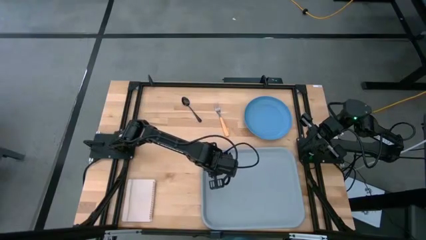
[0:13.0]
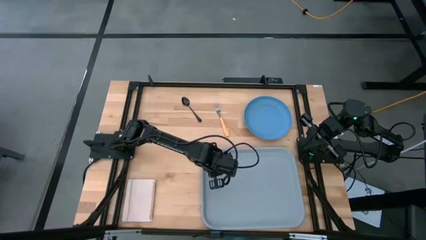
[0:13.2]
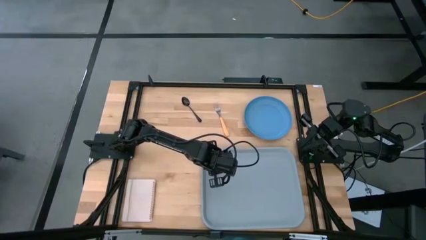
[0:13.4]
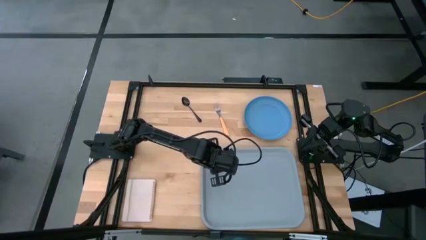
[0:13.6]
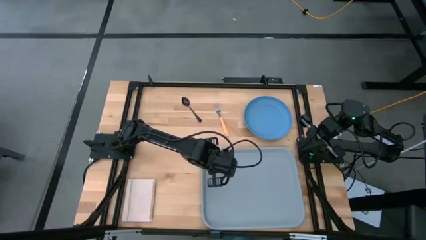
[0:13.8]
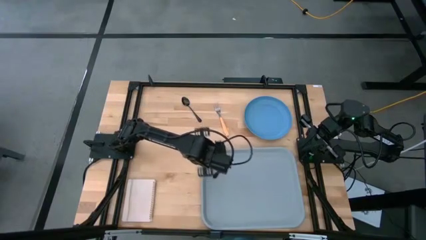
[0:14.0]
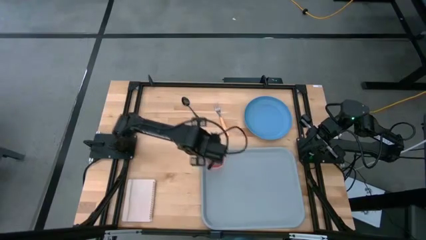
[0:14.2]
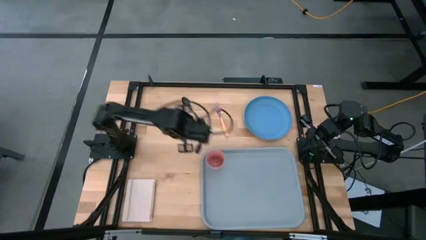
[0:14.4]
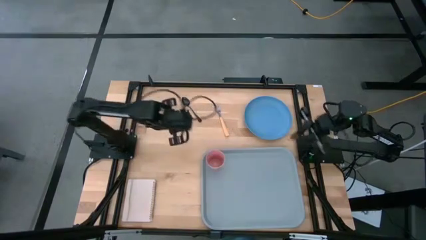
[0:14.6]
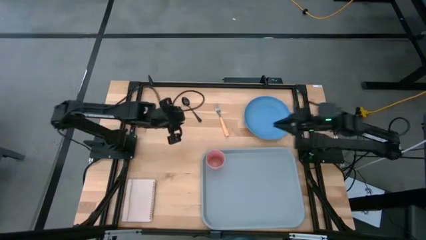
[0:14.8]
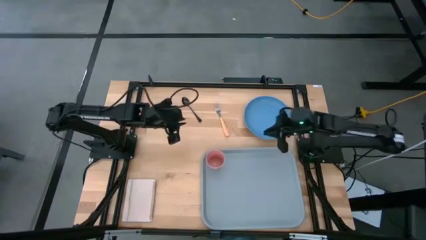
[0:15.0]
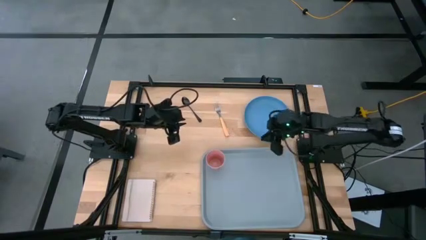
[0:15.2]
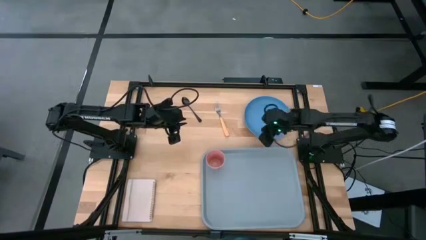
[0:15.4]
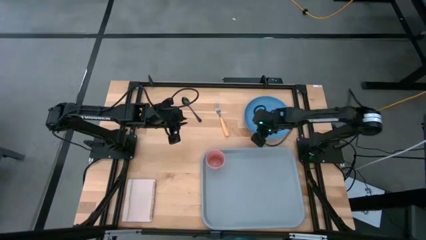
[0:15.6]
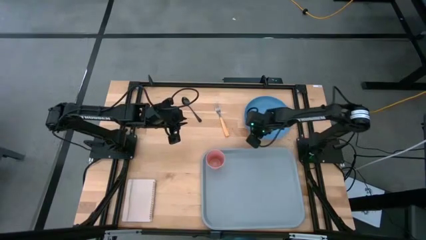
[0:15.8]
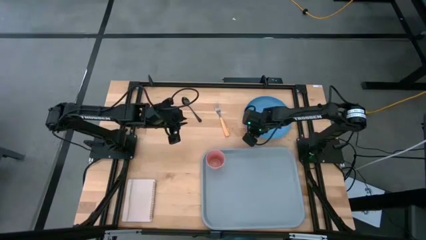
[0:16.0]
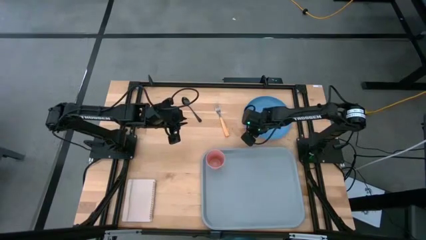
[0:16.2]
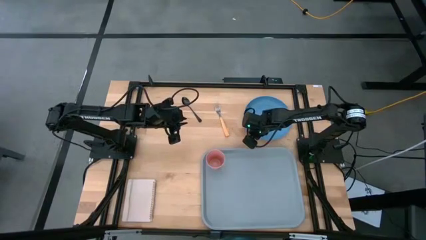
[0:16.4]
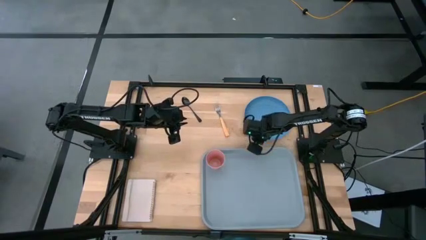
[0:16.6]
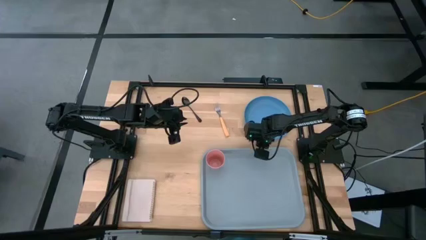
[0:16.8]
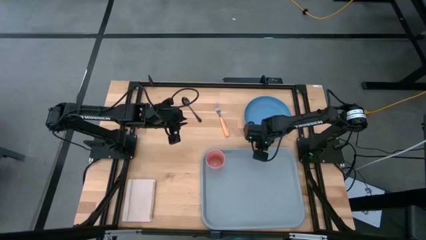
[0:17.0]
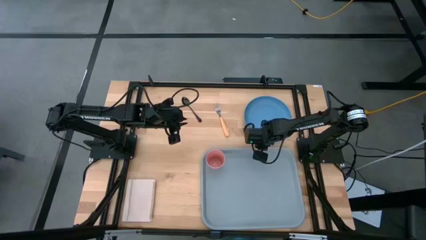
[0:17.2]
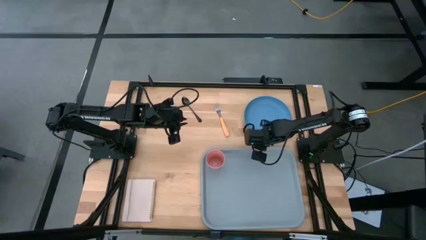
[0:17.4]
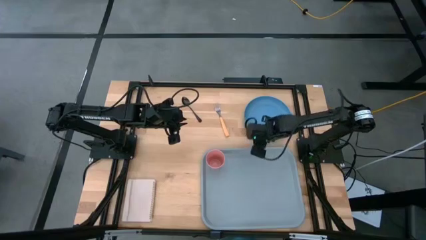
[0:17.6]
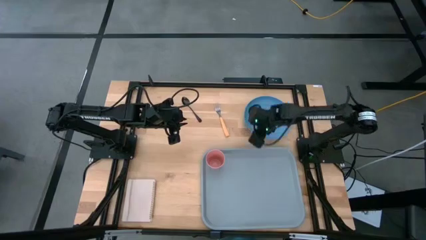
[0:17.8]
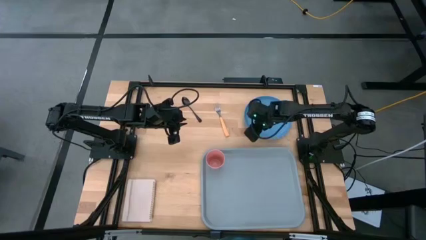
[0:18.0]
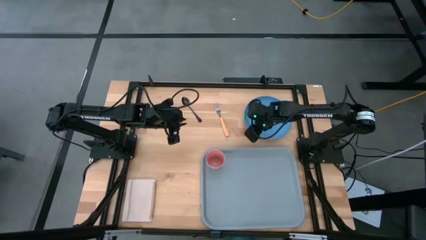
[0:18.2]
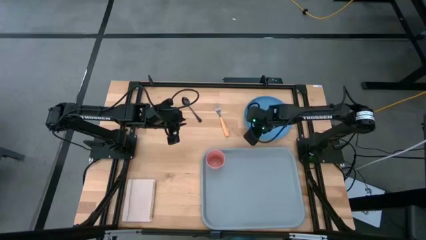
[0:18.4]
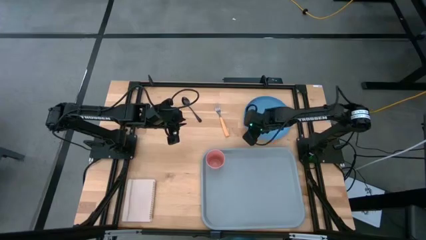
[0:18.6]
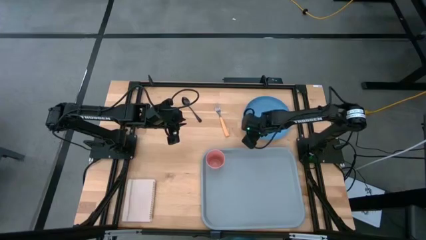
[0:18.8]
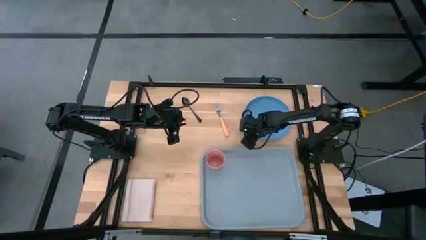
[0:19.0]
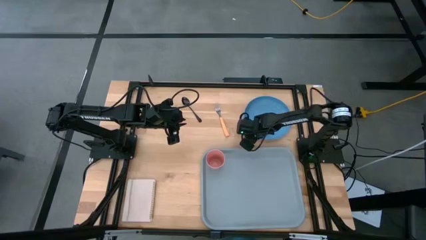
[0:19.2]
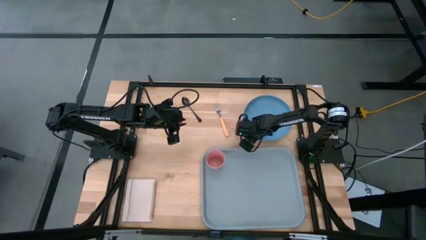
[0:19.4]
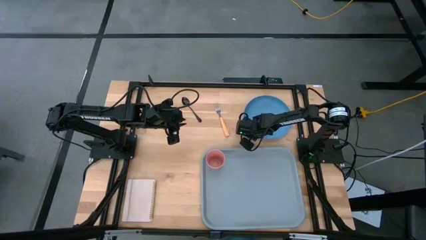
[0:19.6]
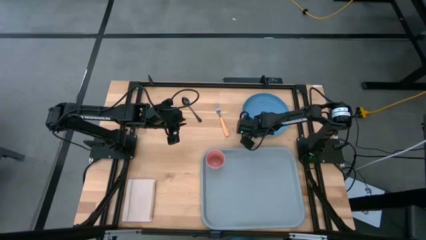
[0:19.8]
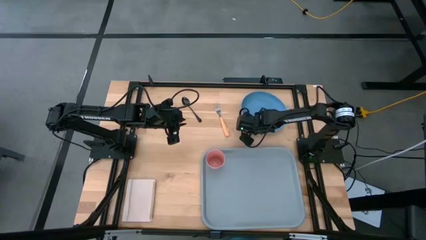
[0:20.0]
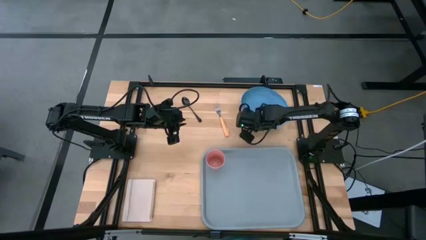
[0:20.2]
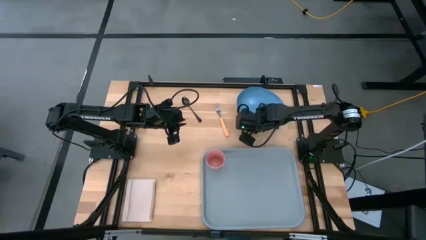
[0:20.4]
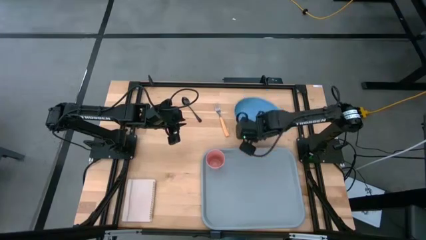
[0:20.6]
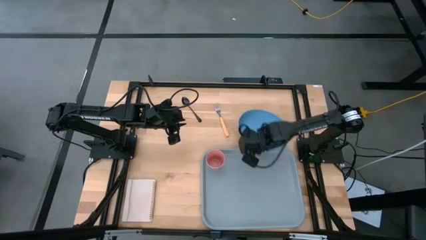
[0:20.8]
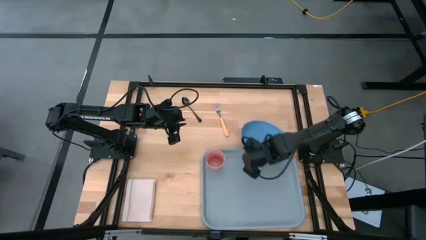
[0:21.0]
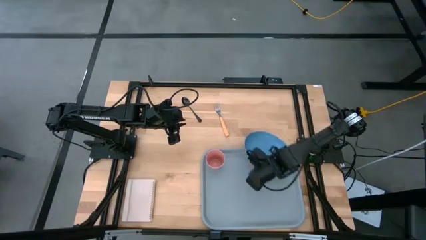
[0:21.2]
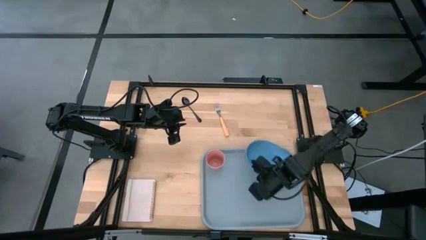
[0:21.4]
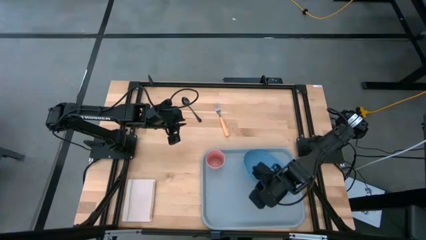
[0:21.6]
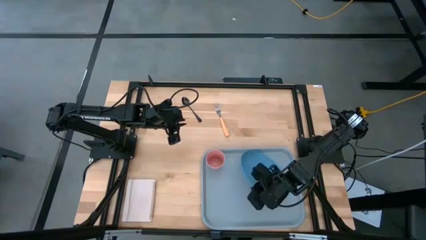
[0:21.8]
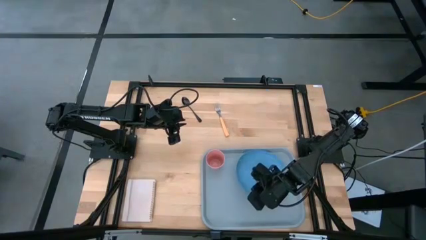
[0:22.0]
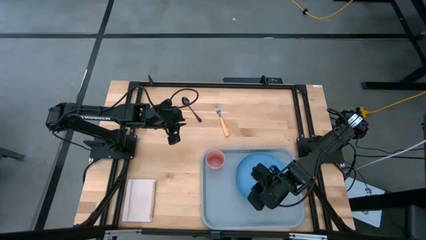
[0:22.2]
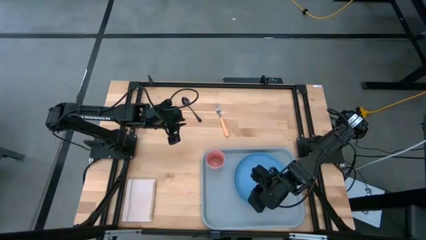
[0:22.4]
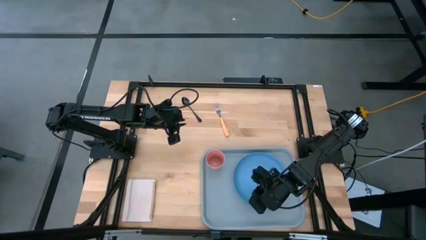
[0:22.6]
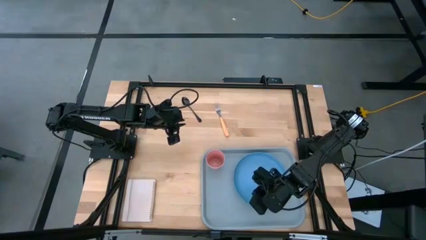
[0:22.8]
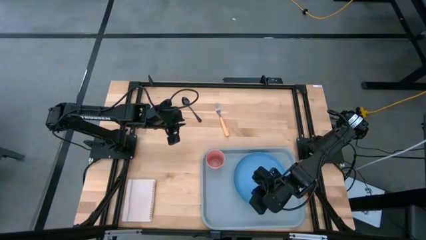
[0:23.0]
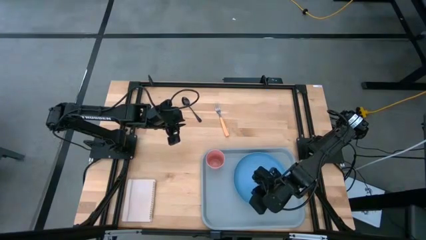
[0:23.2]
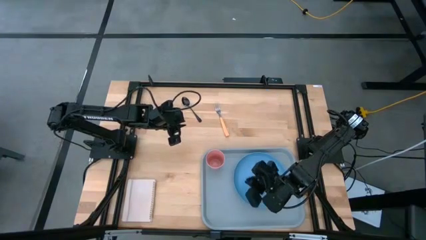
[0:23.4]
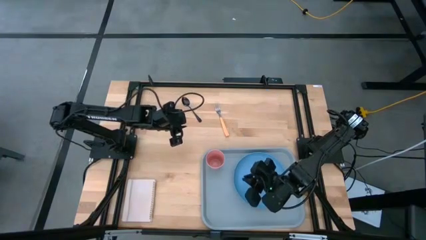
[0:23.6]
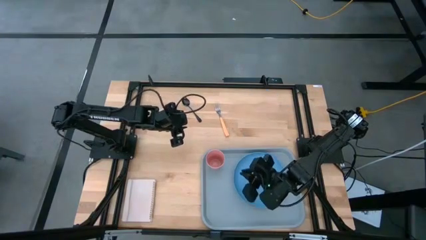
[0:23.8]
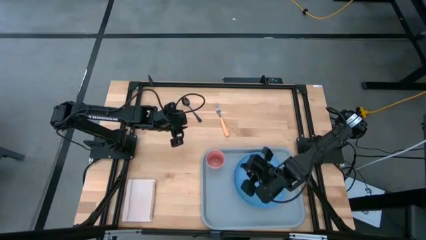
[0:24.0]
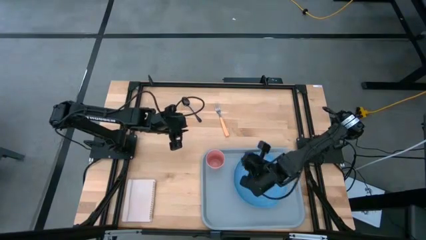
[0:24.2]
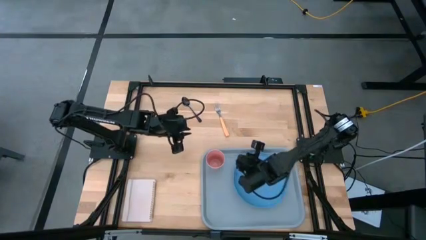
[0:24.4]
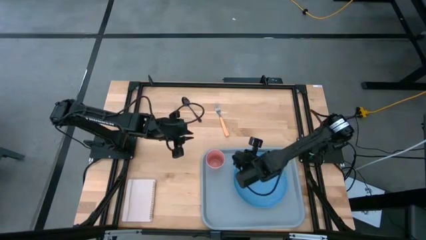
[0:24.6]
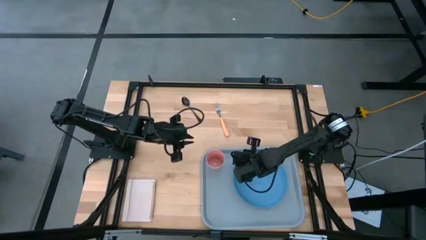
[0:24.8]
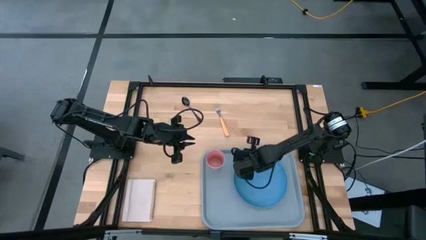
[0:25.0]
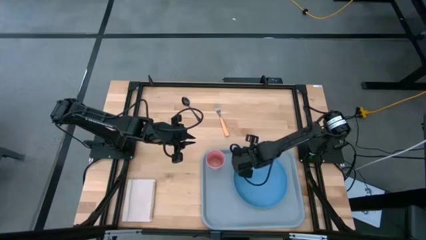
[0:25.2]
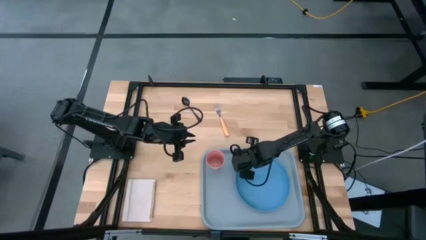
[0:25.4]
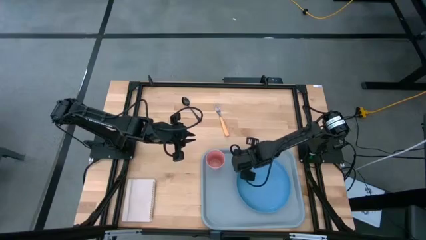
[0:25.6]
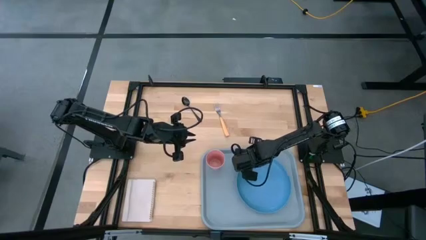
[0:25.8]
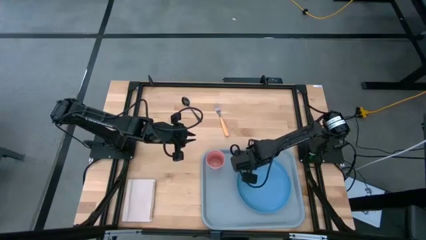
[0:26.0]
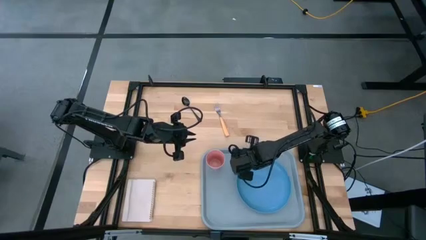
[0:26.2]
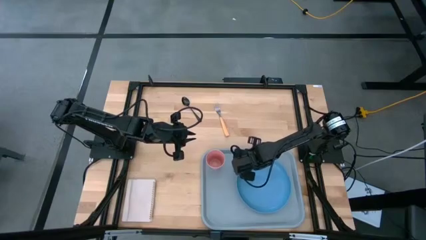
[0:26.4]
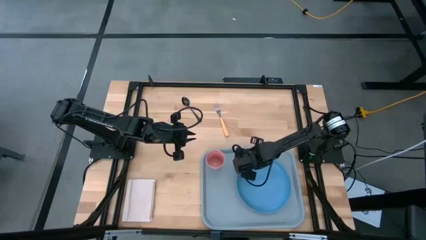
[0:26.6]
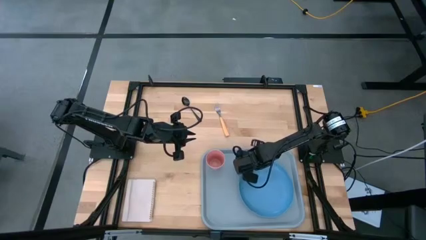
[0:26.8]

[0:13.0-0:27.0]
Task: Pick and place plate/cup/fork/spoon on tray
Put the blue plate on the bottom right of the gray tray
